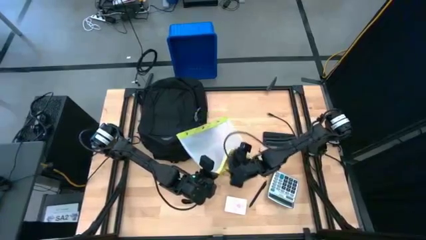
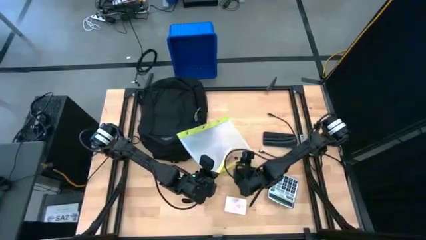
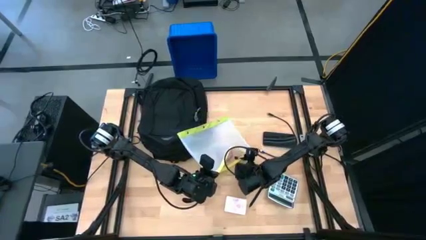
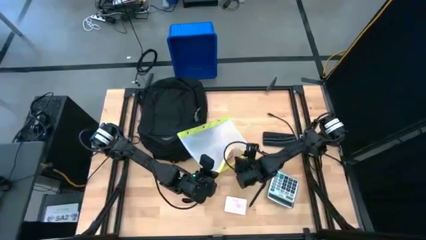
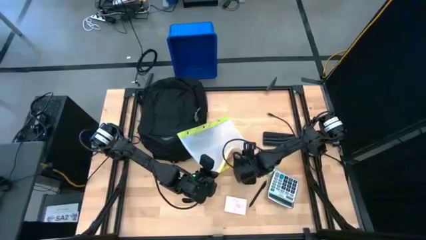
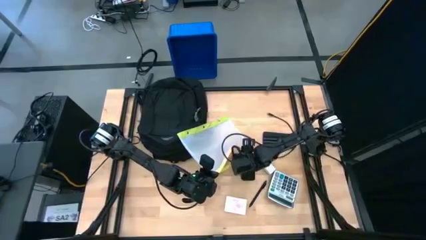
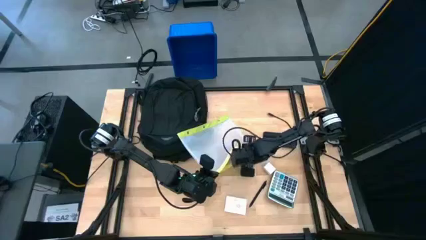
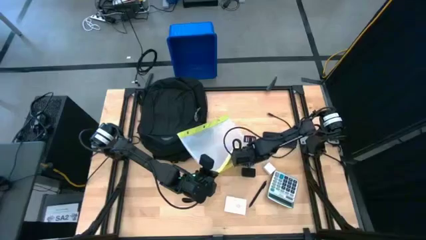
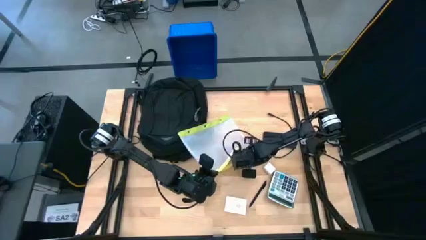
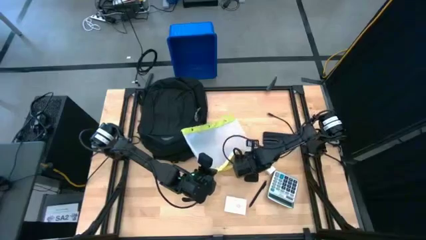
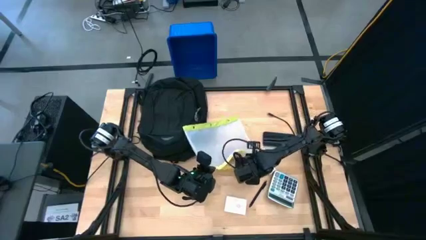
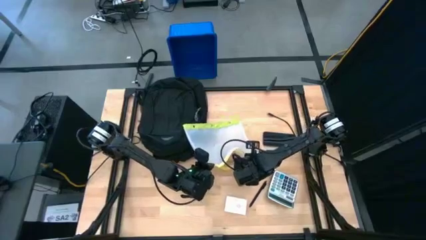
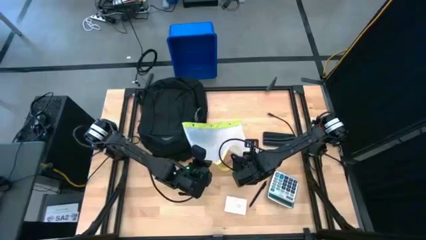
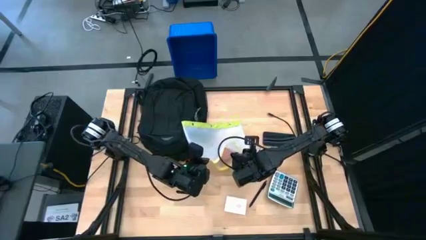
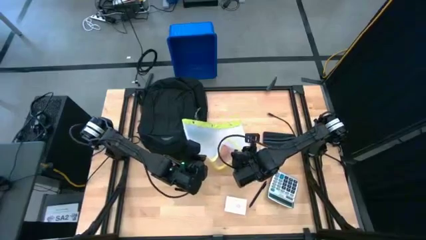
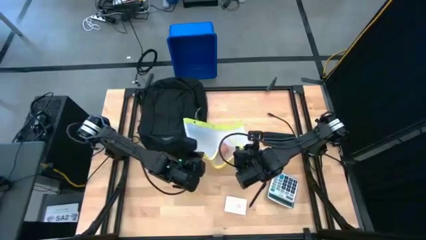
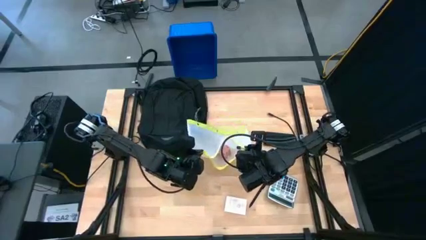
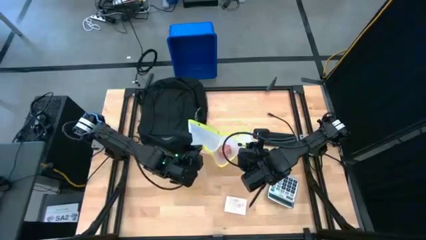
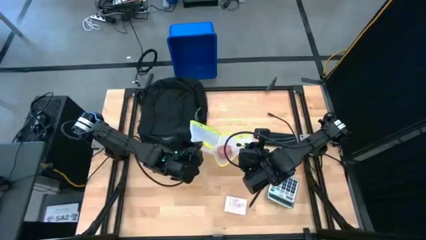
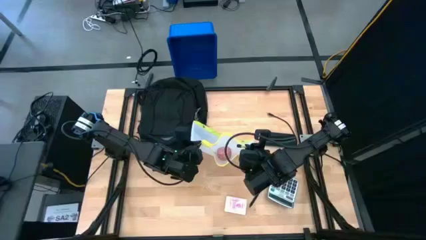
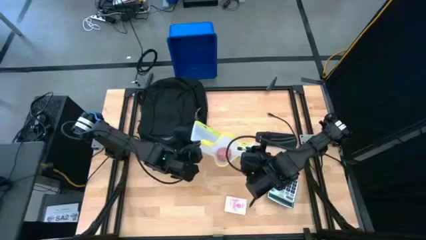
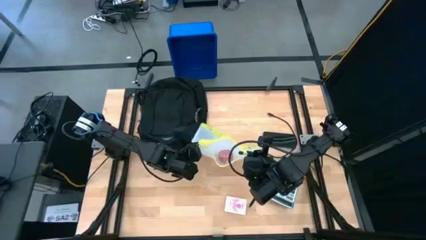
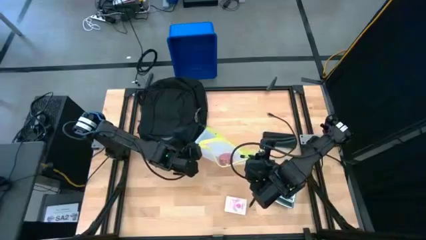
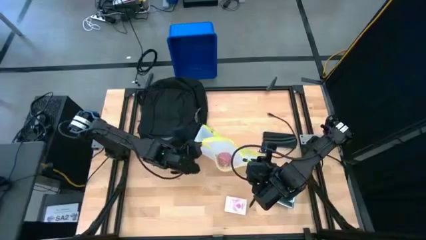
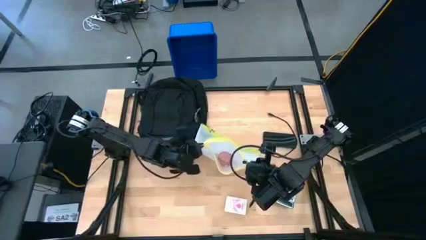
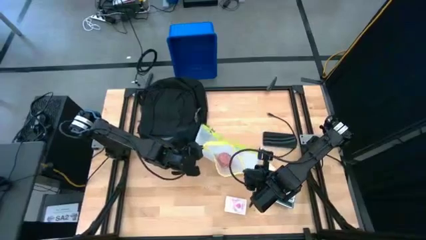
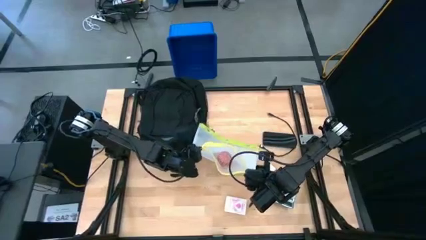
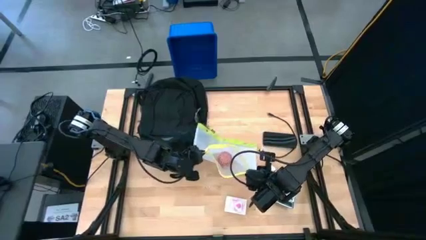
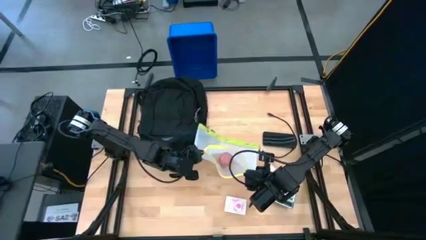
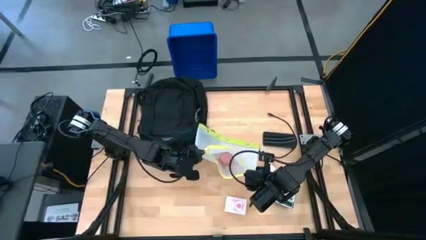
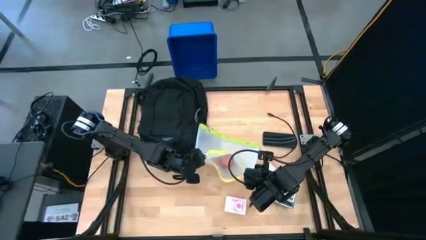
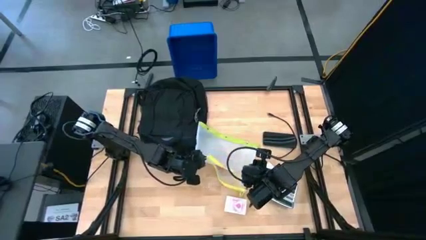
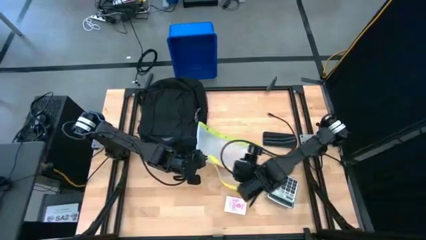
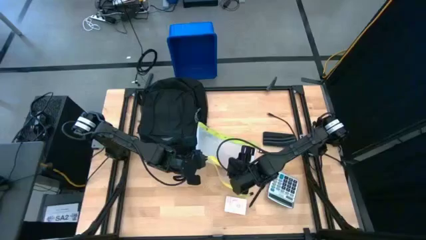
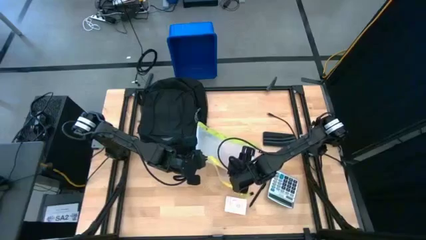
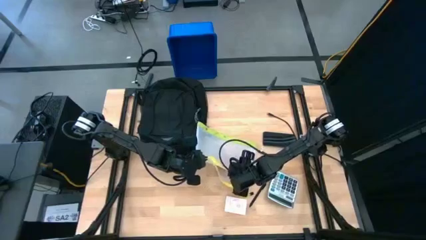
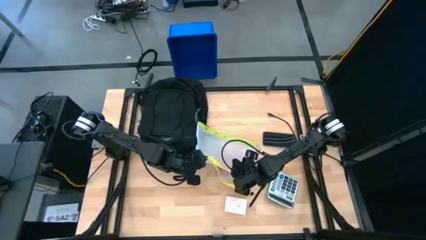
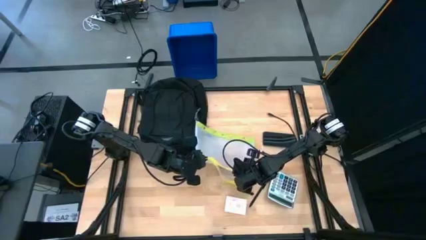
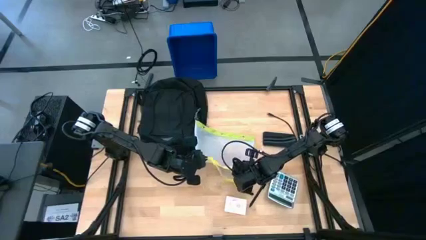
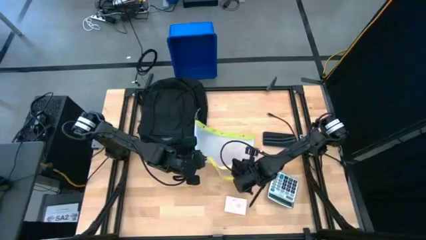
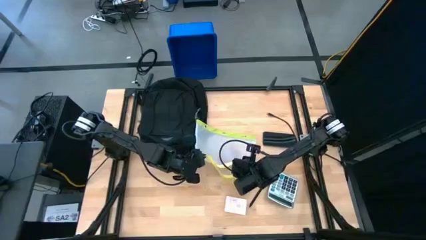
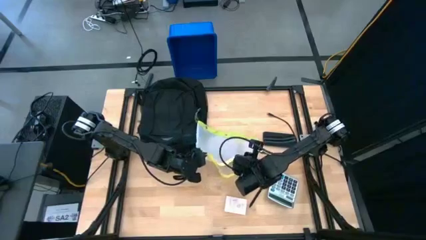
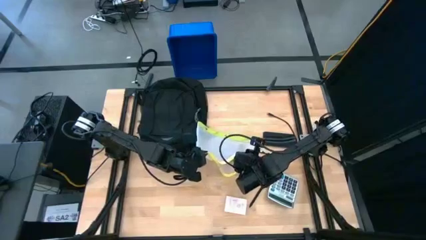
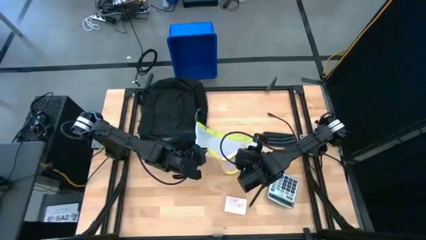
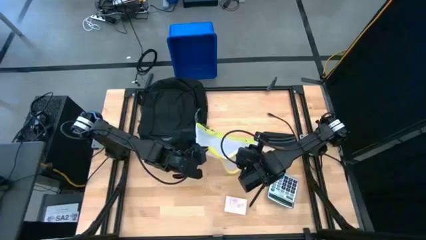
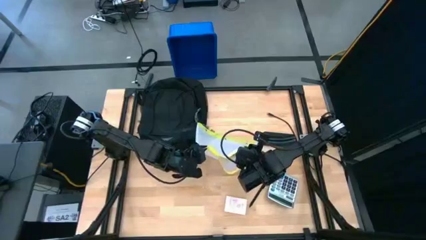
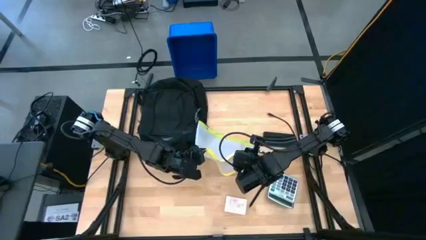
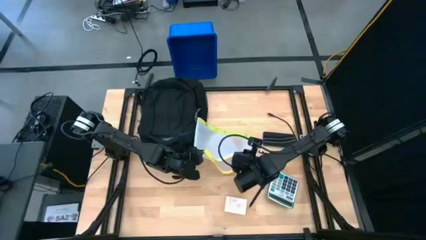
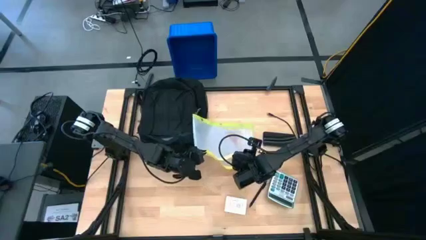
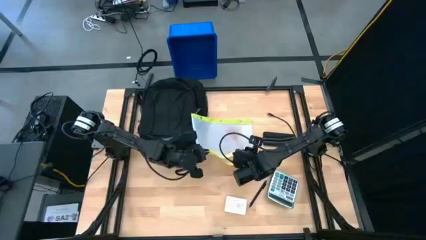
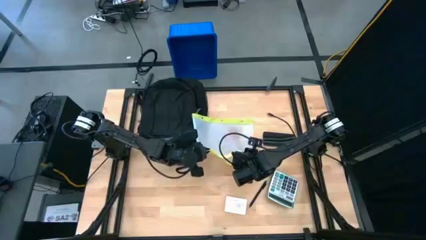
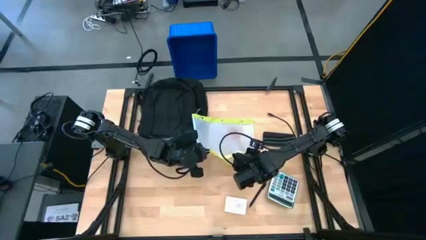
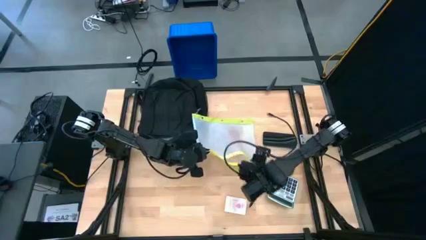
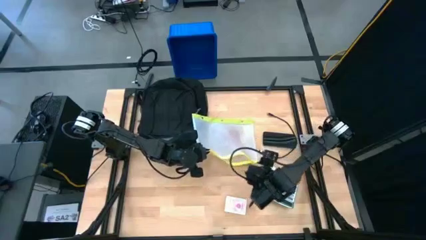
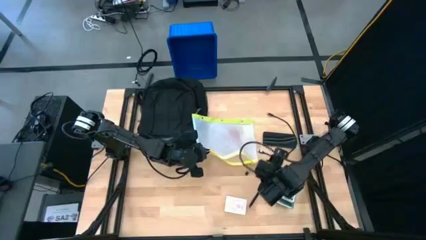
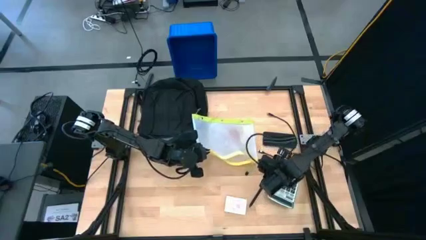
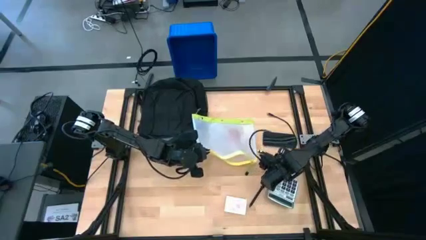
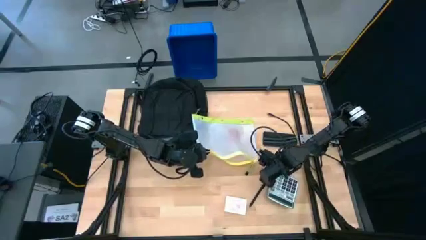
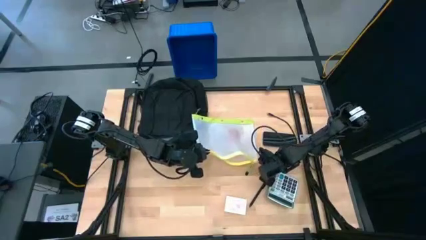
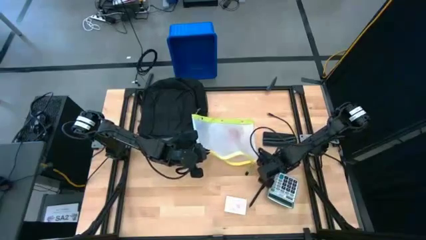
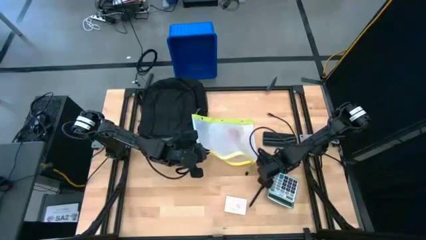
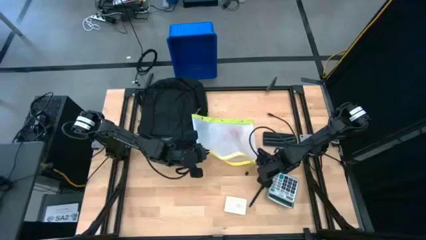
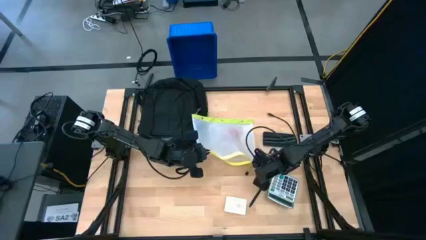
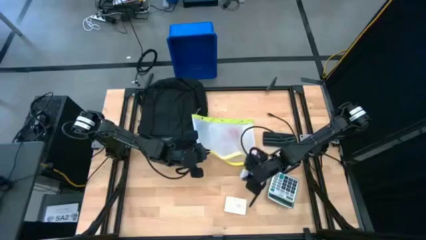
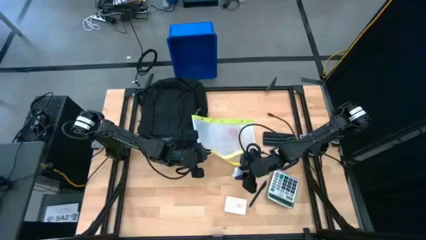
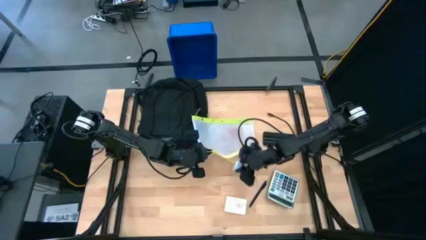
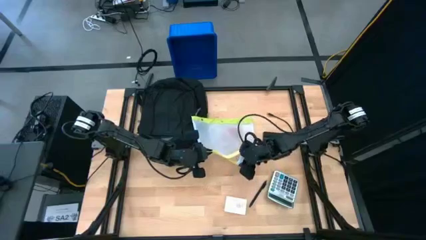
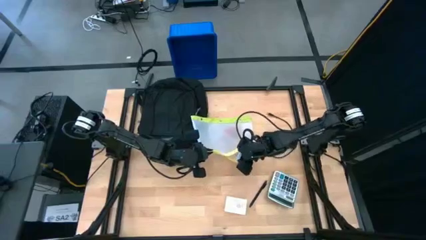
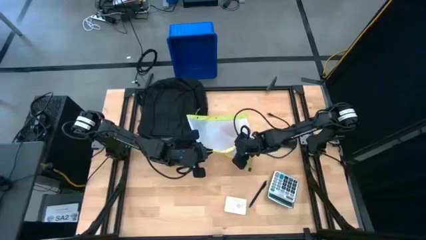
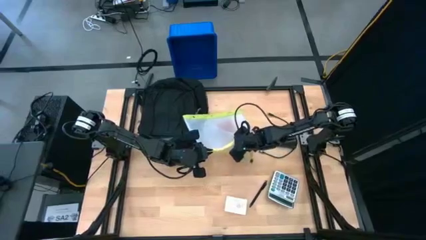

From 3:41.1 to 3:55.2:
Task: Unpack backpack
Put the charger adapter into the zip lock bag

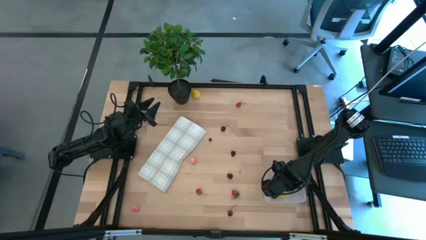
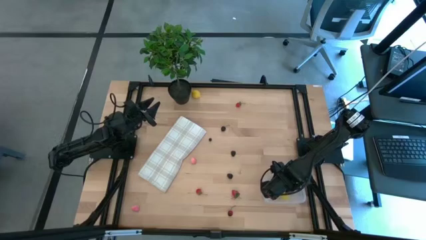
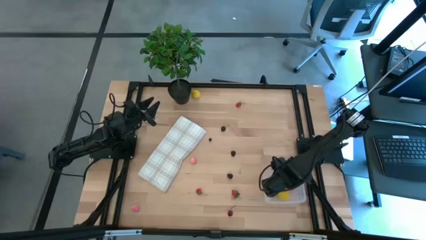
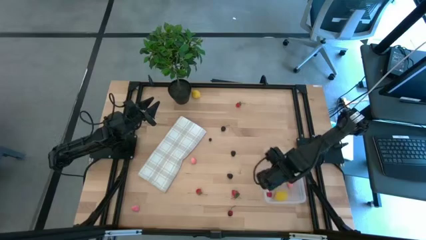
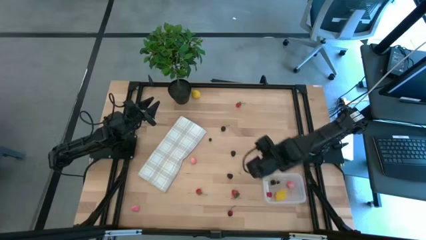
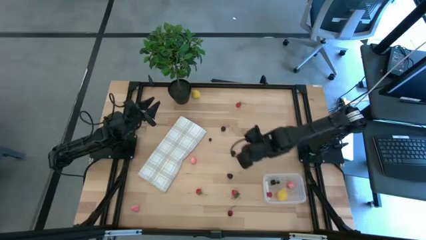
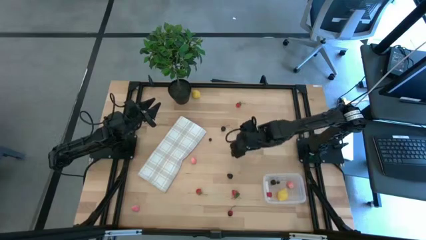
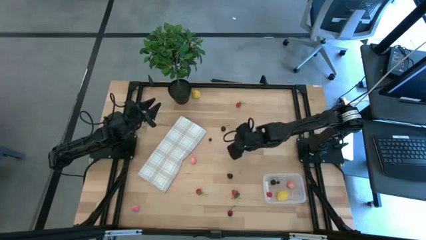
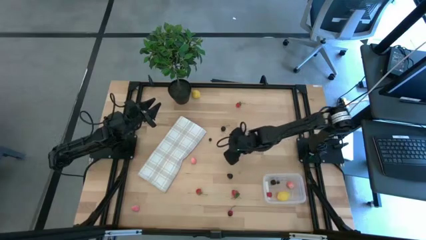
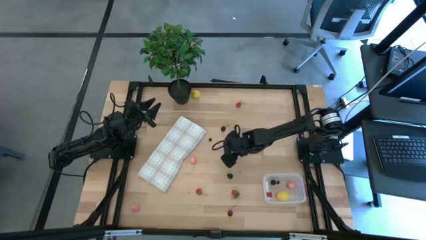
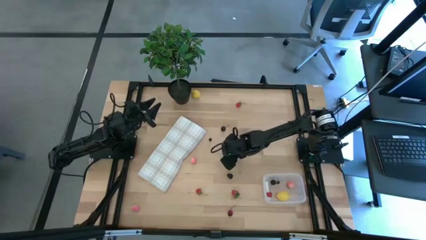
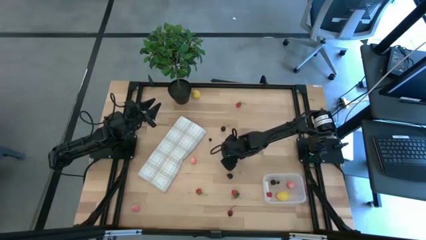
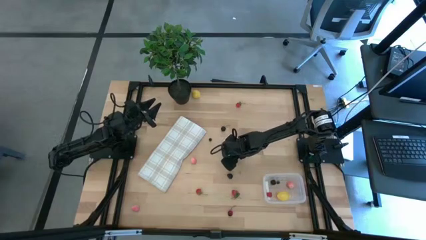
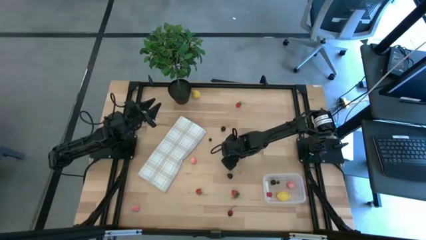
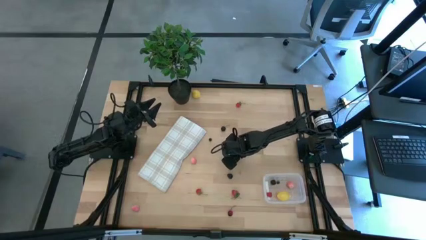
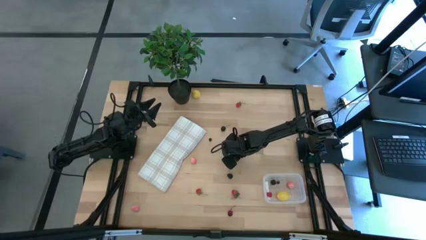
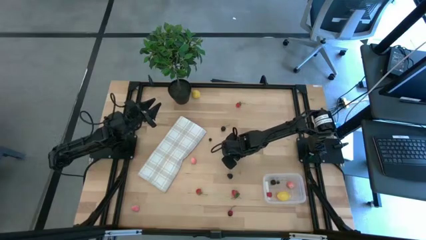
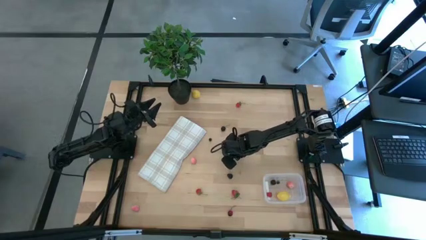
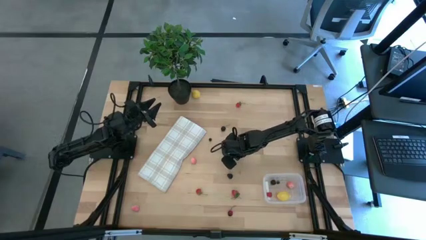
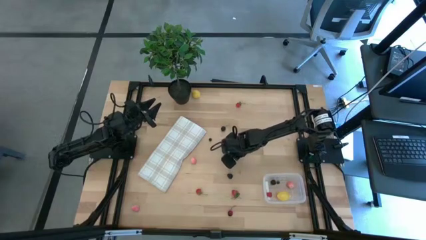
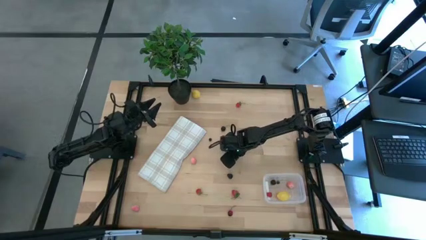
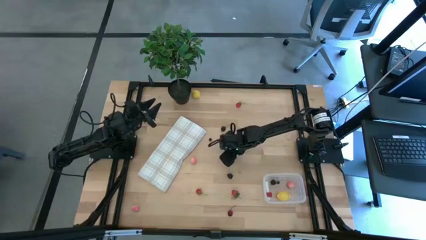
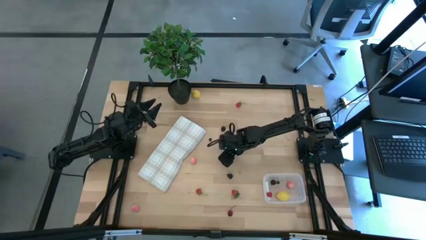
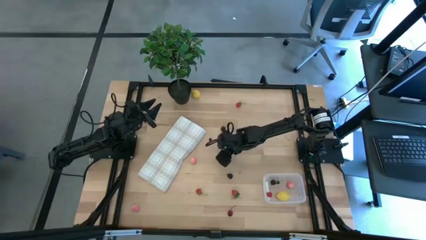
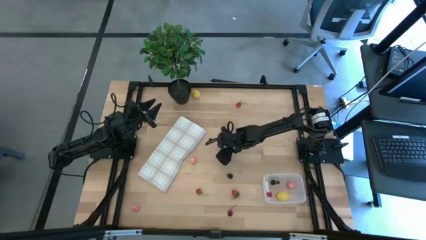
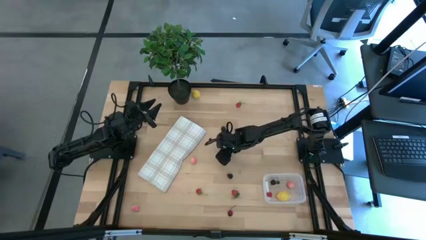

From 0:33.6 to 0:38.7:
Task: Pick and placing Produce into tupperware
Put the top black raspberry into the transparent bin
